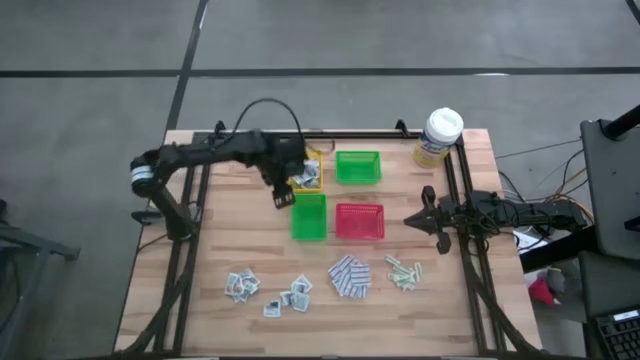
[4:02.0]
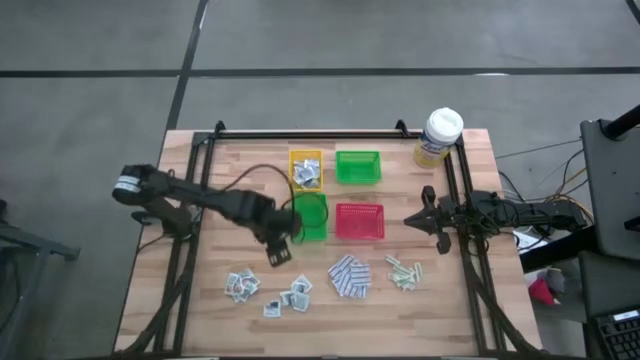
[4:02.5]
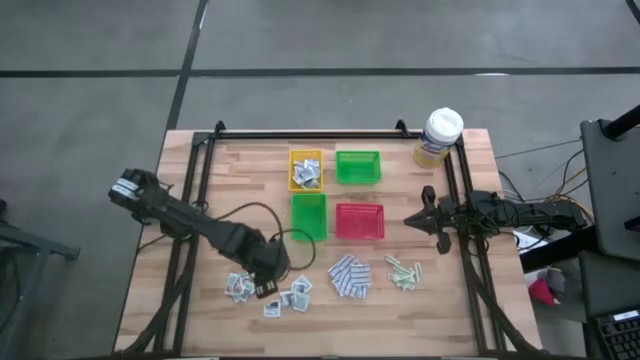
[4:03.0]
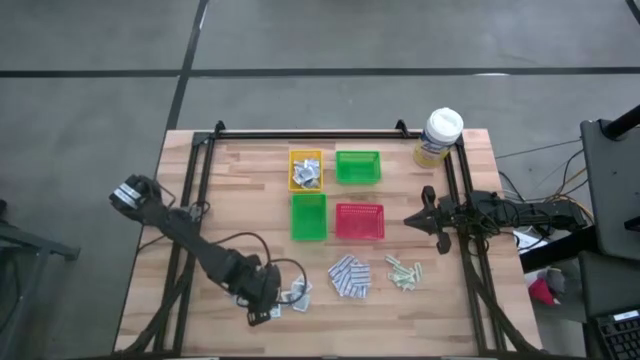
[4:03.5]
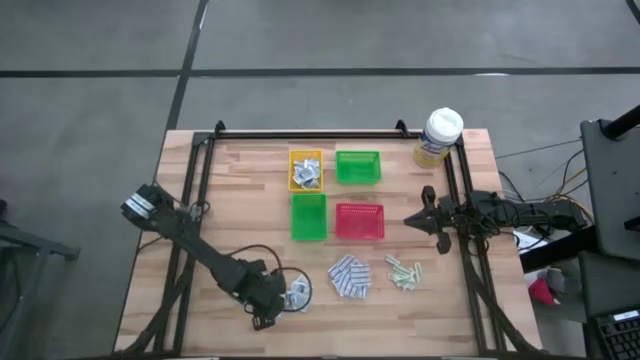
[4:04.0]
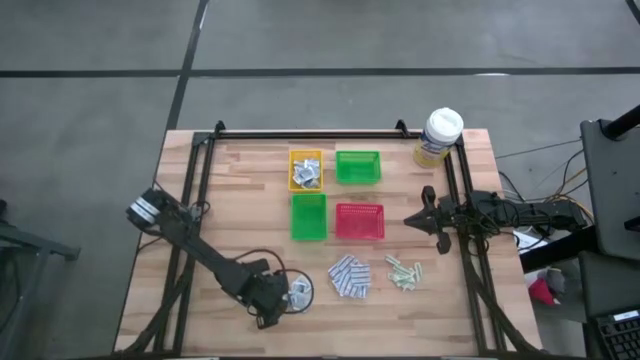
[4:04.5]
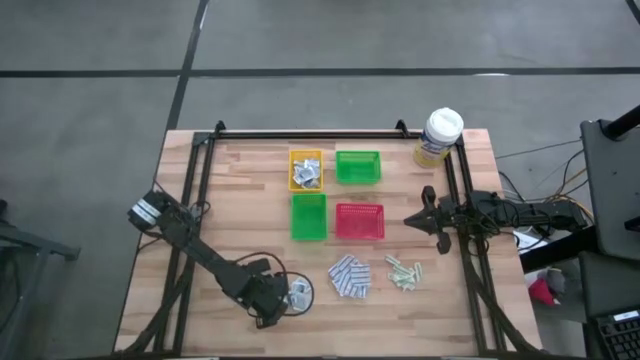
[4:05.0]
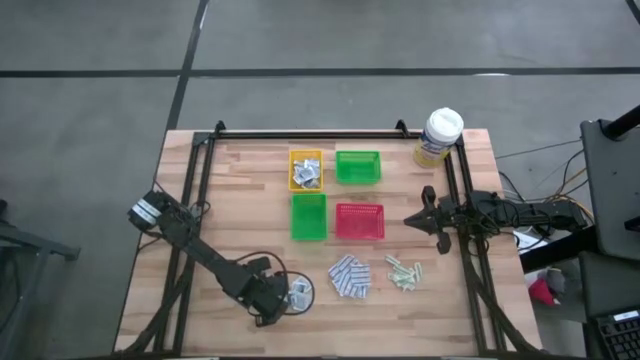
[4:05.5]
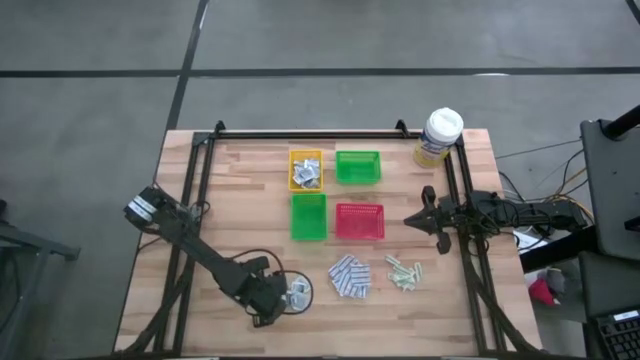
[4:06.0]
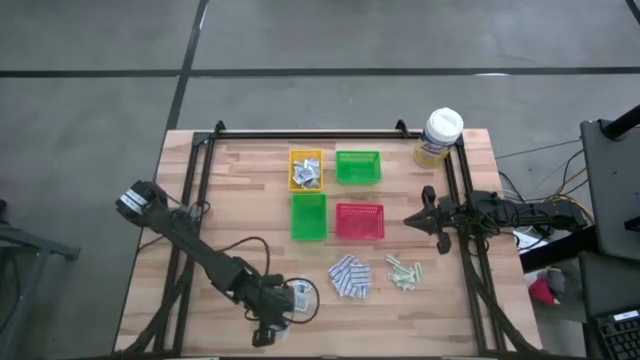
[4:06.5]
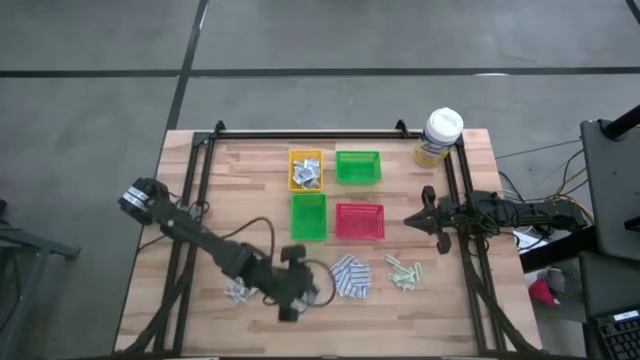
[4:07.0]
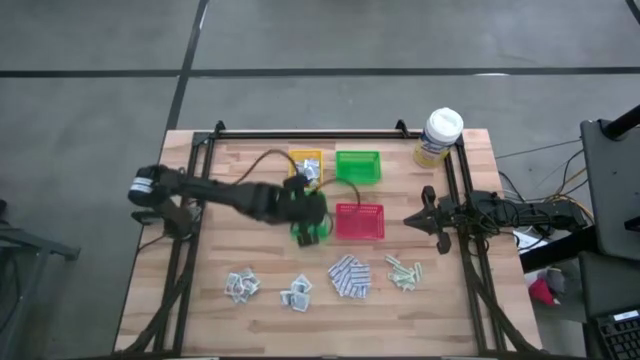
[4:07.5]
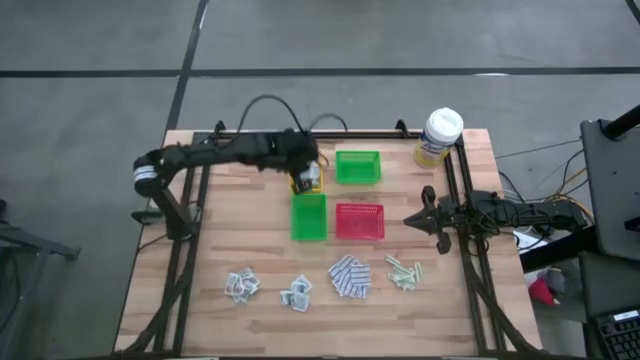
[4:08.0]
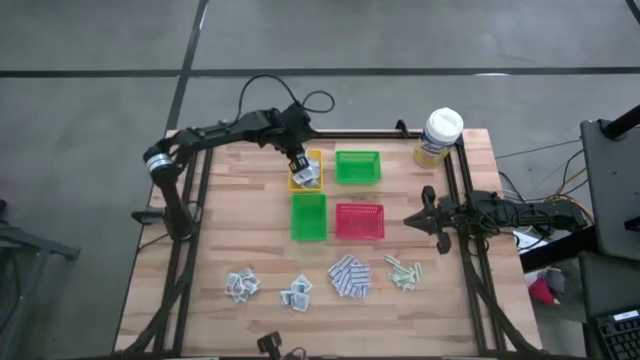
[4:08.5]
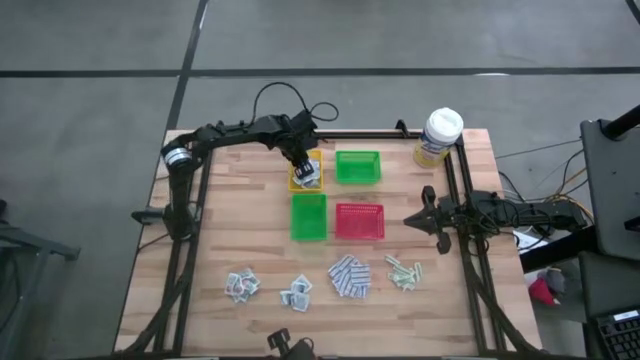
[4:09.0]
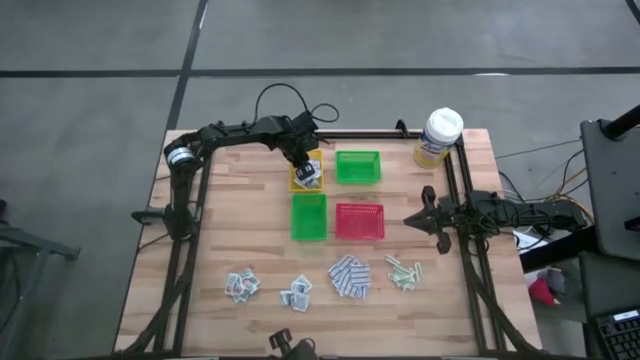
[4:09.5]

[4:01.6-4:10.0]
Task: Pick & Place First Aid Supplies
Put the blue alcohol pad into the yellow bin

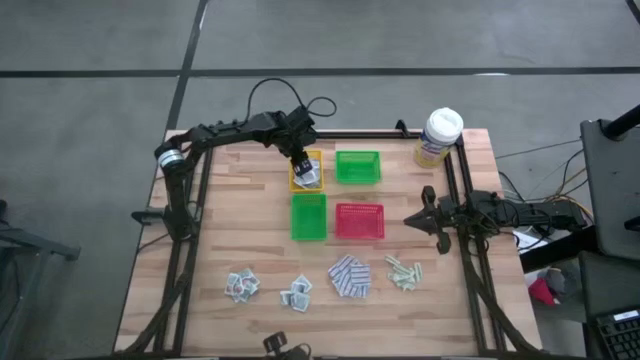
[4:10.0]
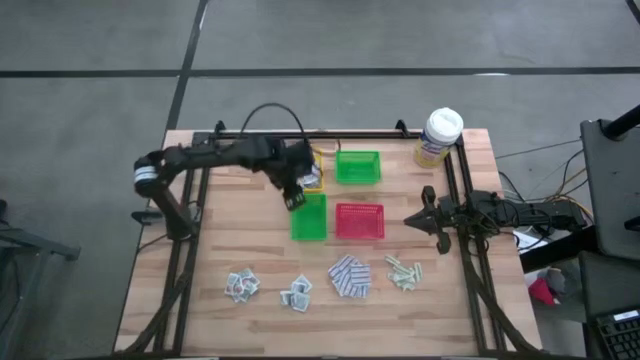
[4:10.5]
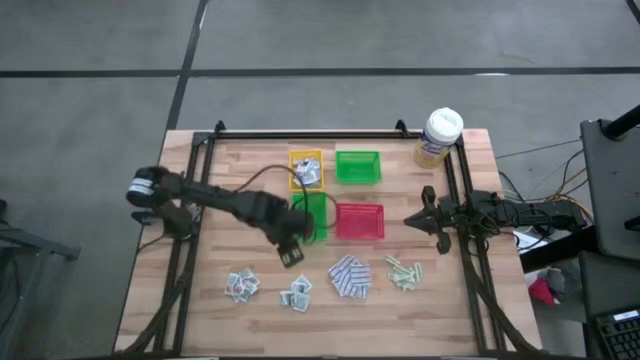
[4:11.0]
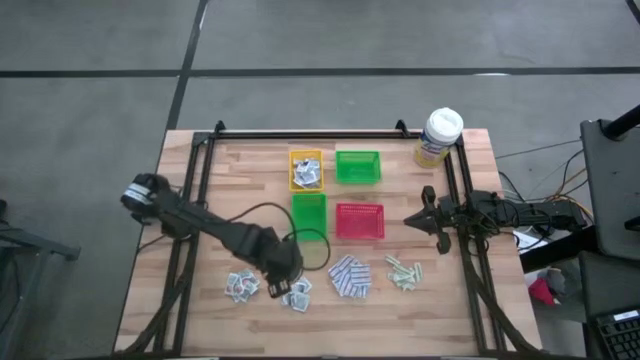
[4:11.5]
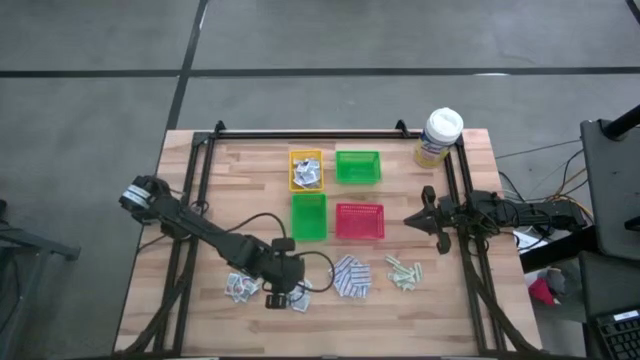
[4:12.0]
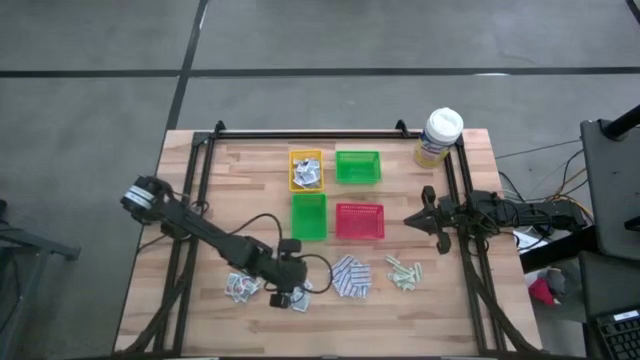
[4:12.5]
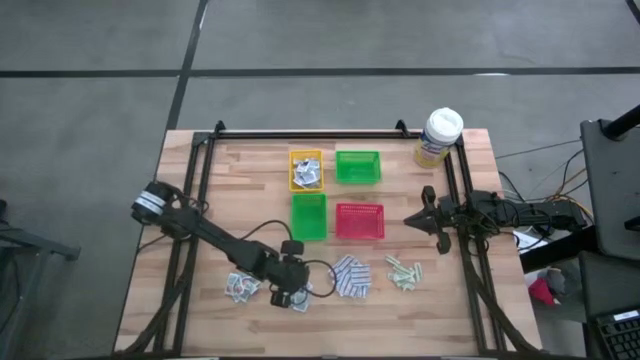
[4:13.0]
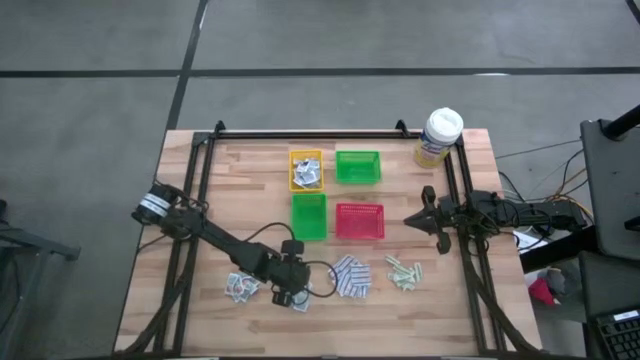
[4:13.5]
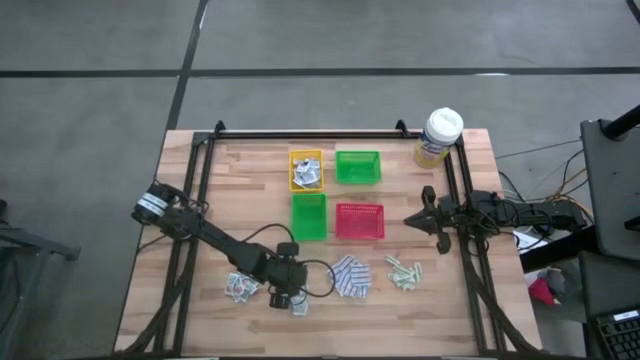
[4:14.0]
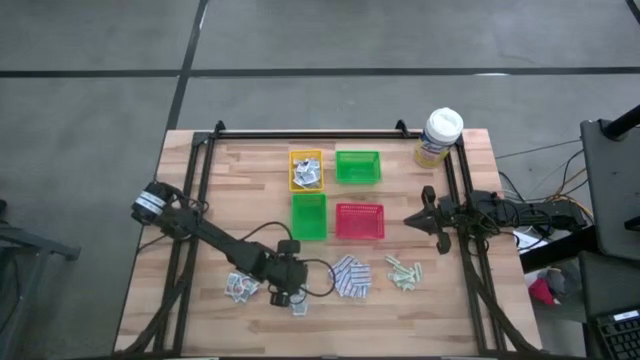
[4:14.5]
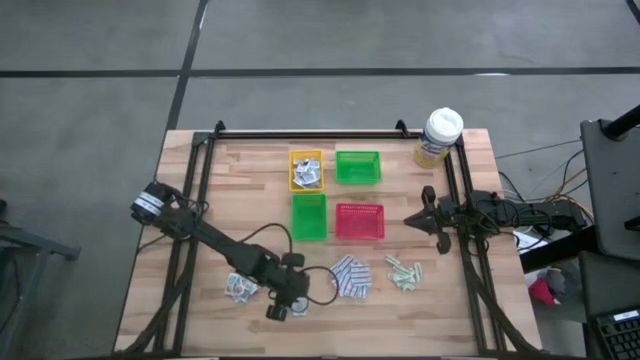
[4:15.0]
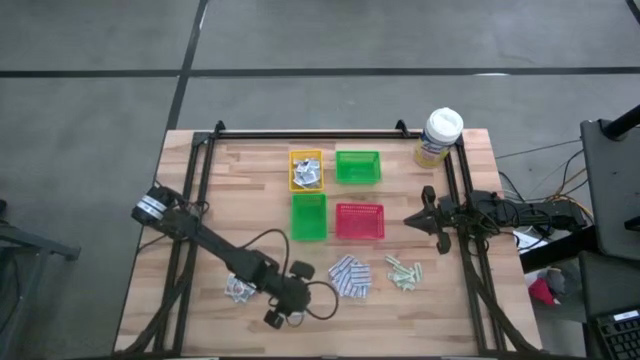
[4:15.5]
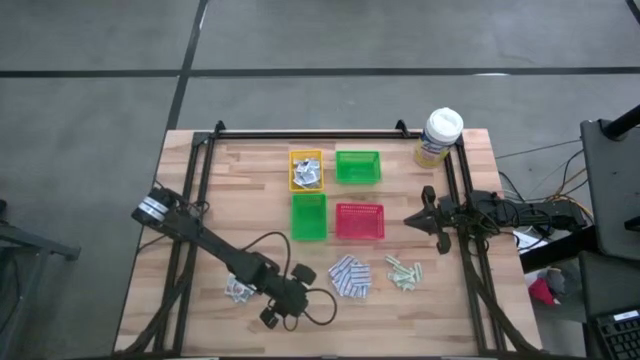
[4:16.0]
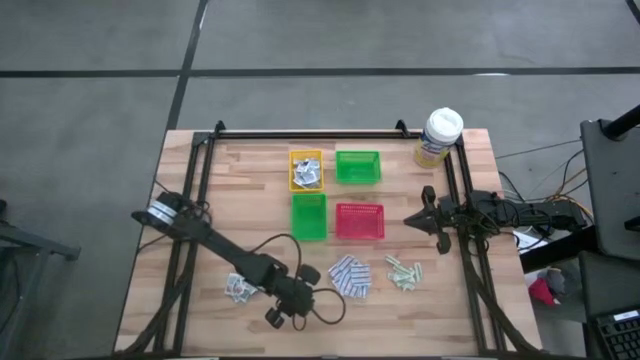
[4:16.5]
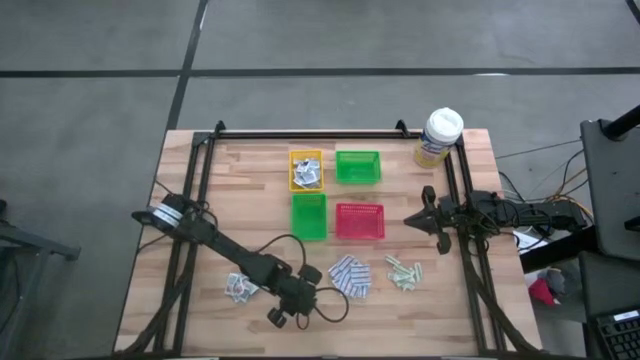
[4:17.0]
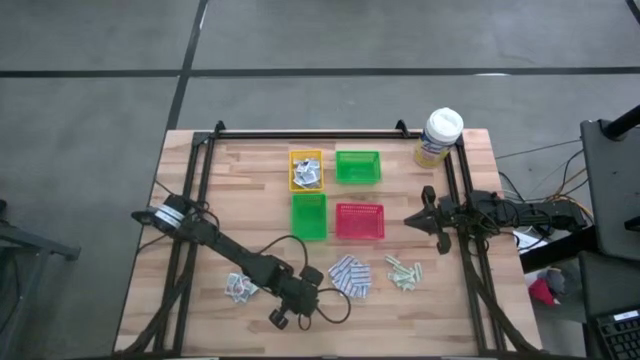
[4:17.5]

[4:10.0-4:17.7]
Put the blue alcohol pad into the yellow bin

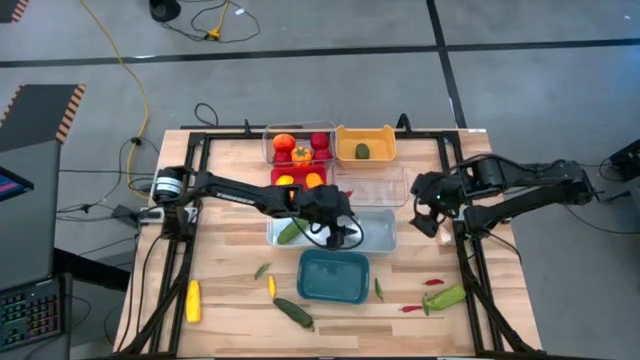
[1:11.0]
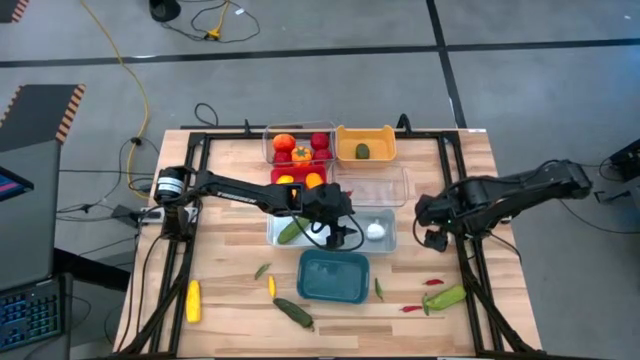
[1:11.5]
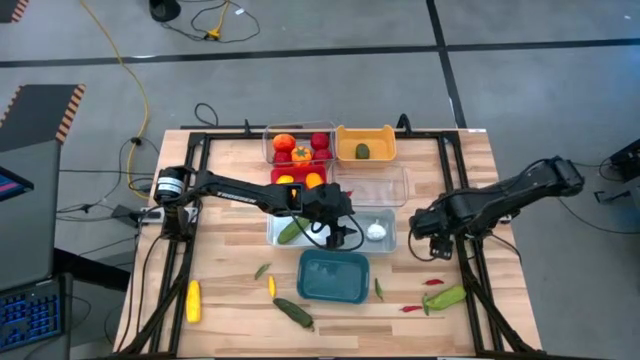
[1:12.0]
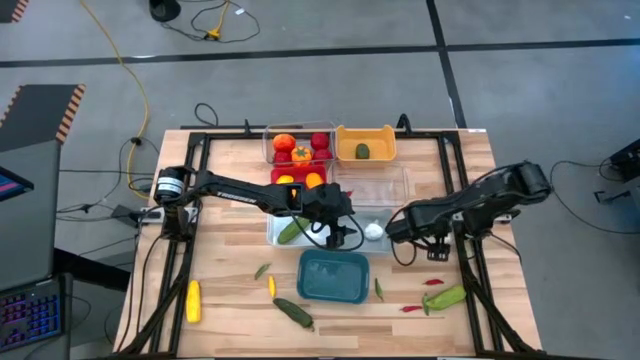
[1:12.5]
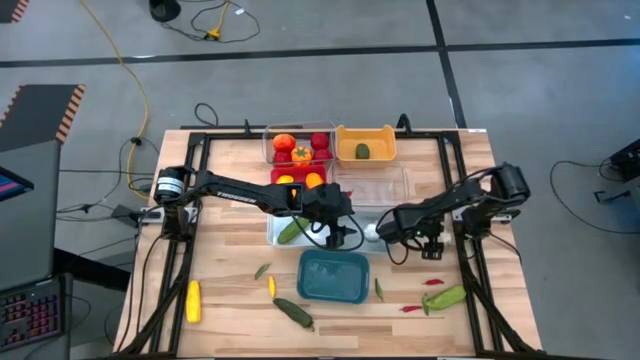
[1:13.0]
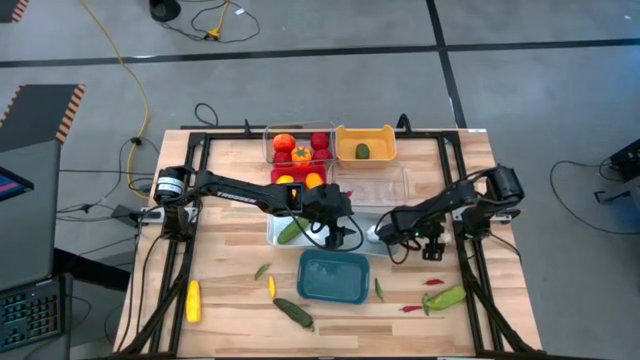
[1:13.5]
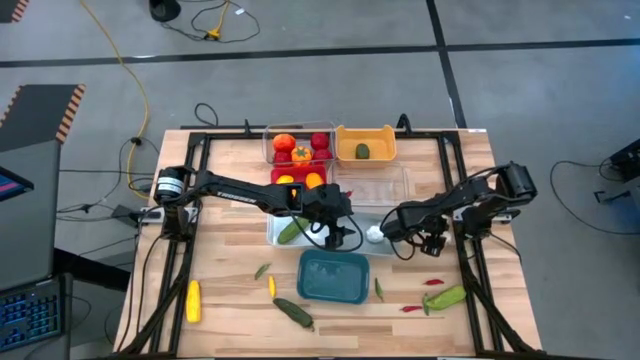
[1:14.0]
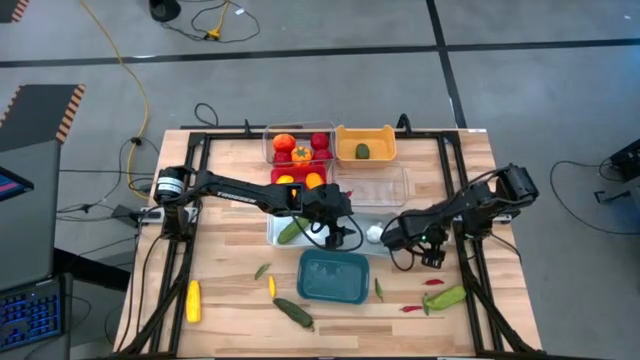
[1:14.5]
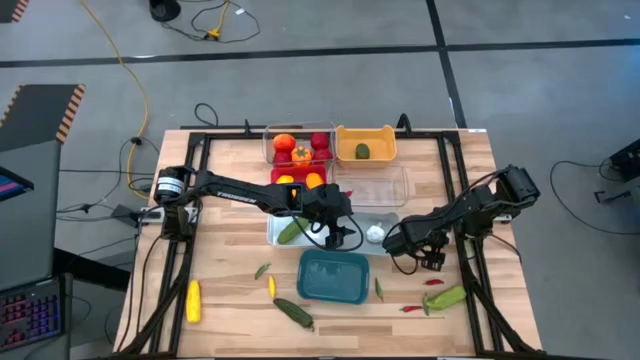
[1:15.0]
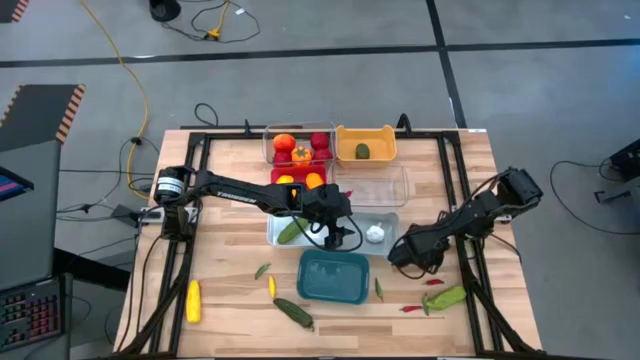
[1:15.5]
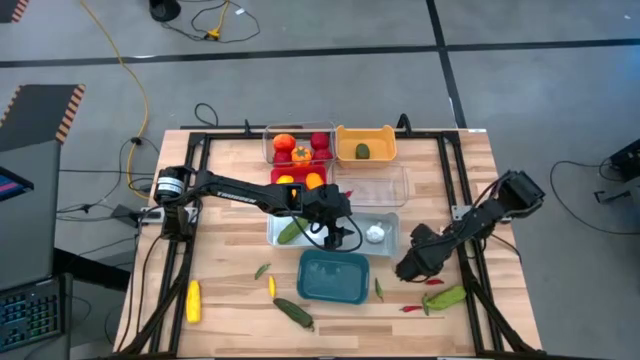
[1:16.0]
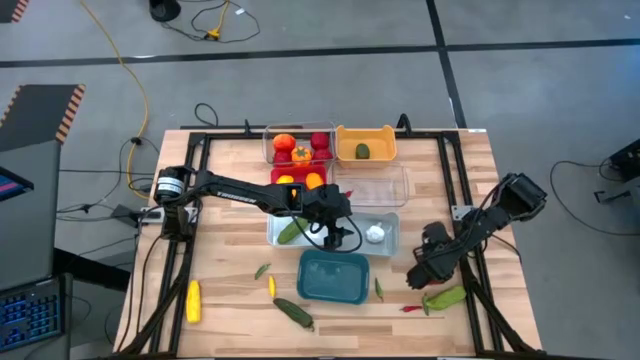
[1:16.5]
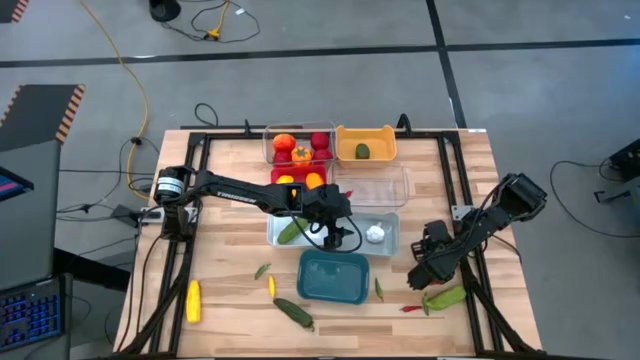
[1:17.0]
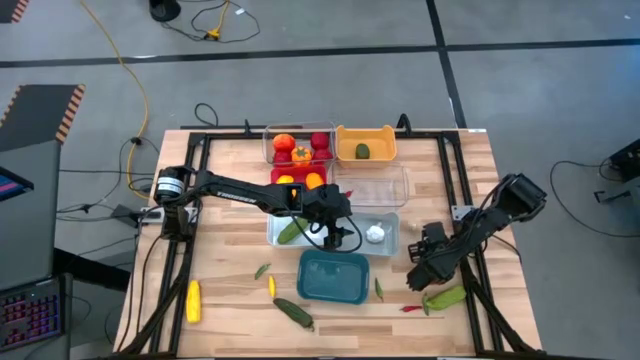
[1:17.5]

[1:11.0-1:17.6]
Task: Sort produce into baskets
Put the white garlic into the gray bin
